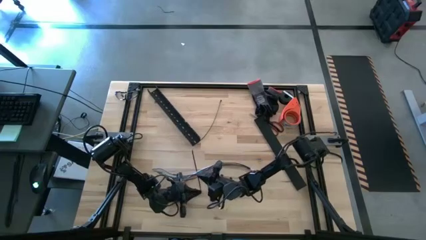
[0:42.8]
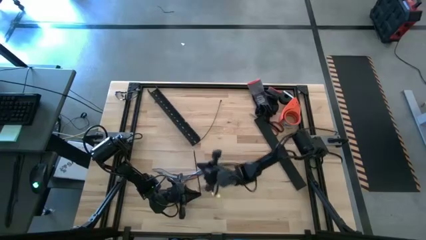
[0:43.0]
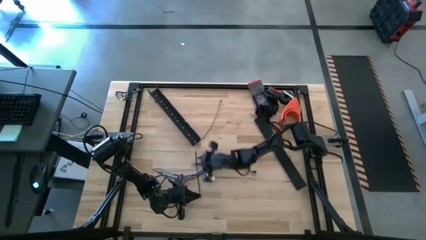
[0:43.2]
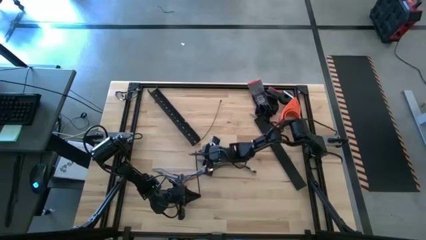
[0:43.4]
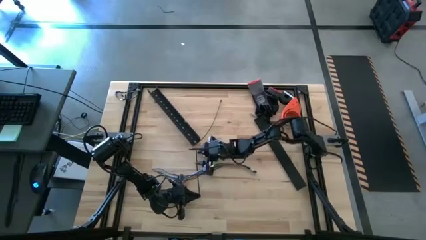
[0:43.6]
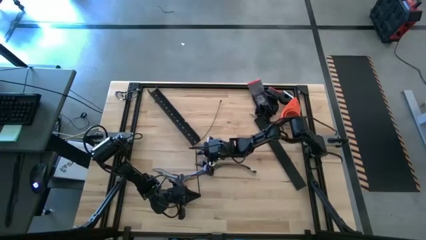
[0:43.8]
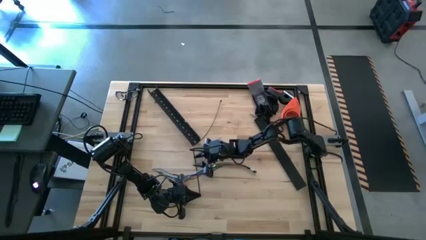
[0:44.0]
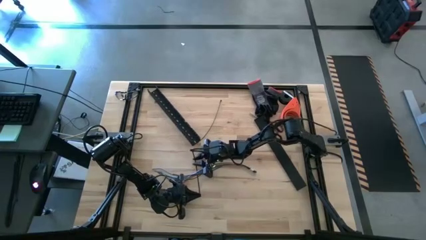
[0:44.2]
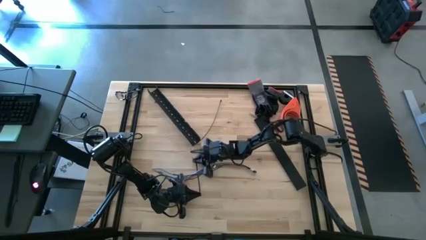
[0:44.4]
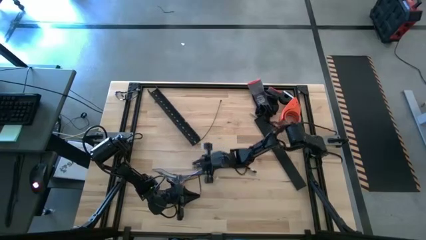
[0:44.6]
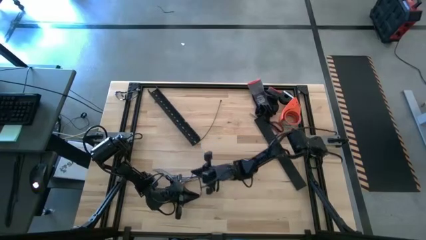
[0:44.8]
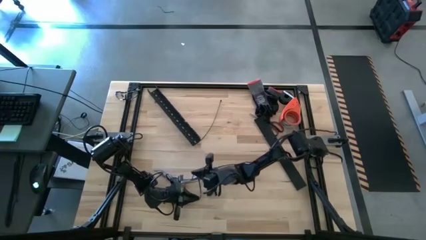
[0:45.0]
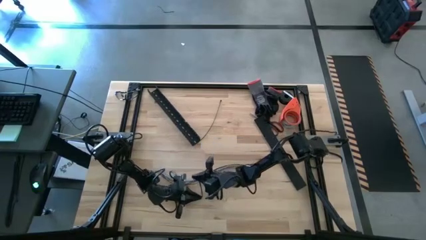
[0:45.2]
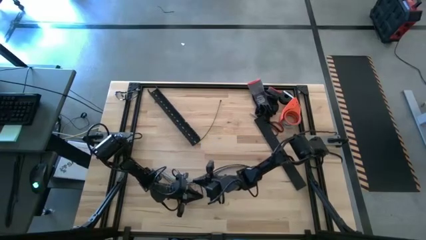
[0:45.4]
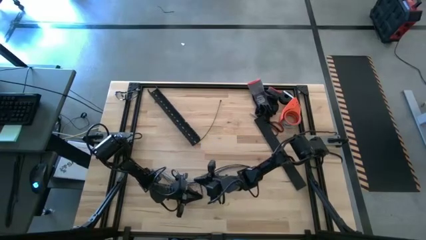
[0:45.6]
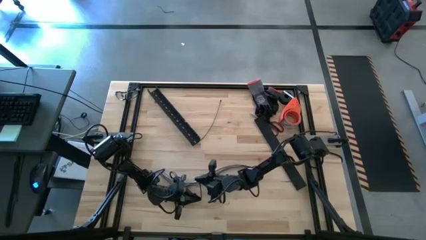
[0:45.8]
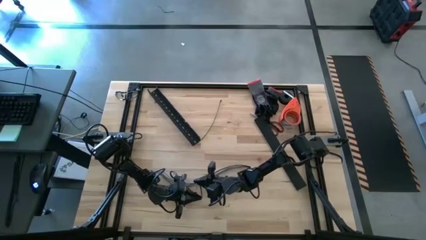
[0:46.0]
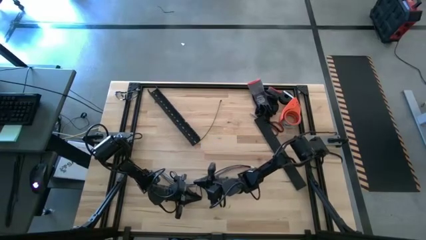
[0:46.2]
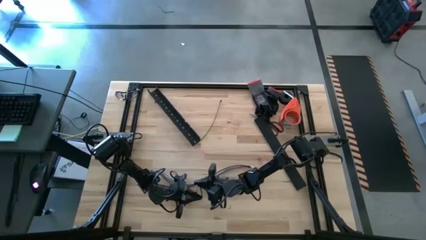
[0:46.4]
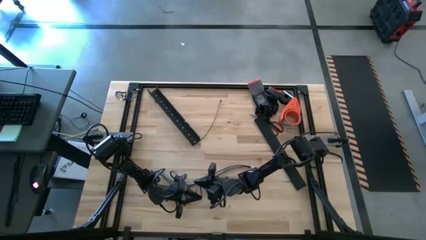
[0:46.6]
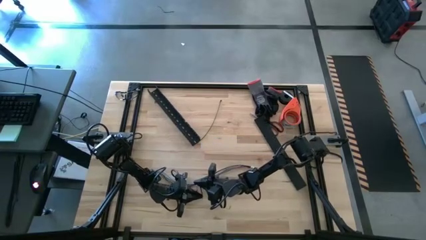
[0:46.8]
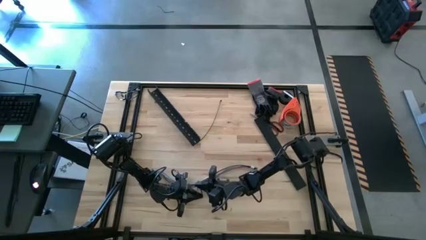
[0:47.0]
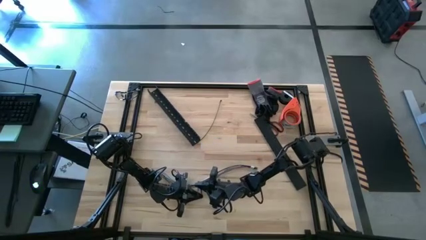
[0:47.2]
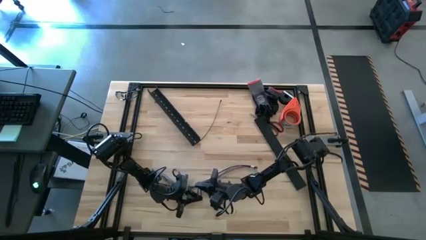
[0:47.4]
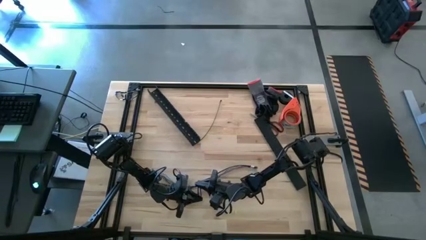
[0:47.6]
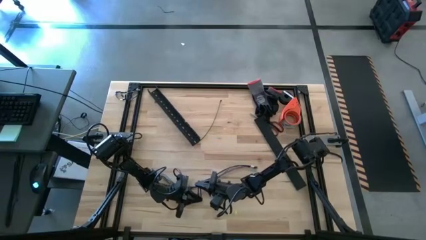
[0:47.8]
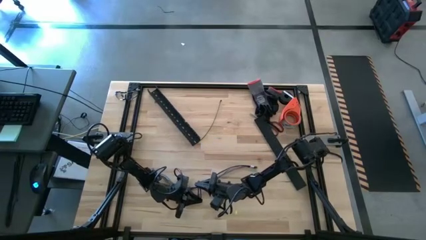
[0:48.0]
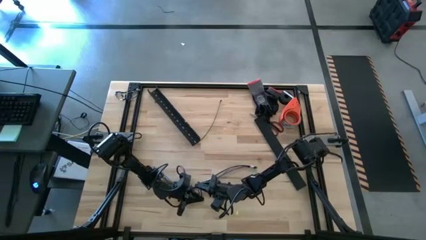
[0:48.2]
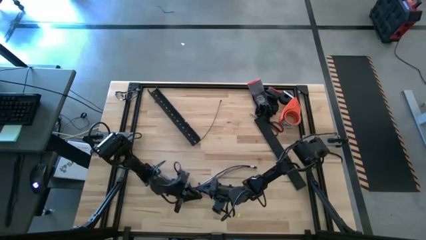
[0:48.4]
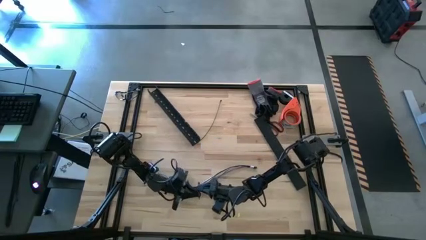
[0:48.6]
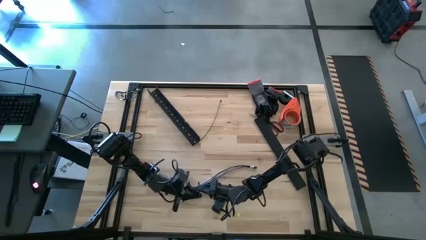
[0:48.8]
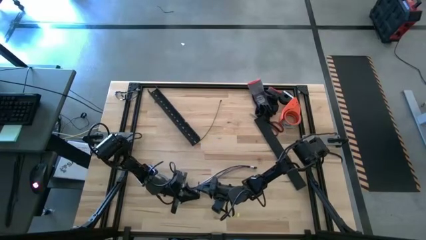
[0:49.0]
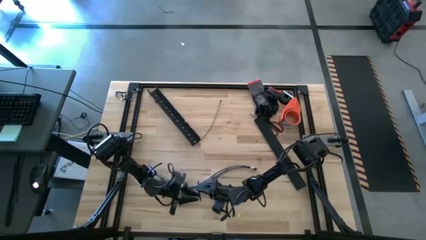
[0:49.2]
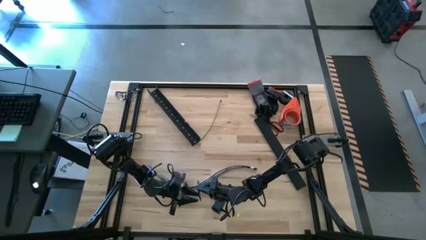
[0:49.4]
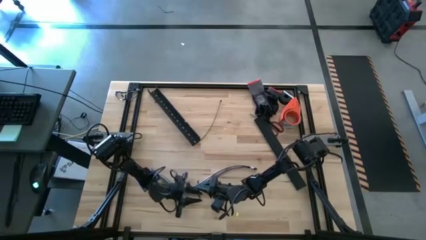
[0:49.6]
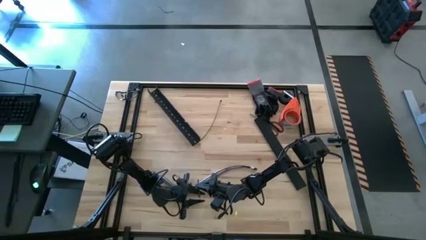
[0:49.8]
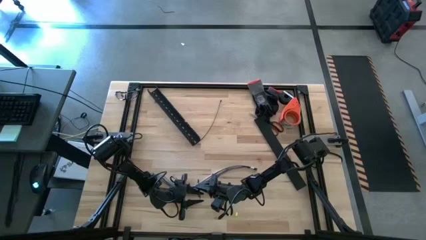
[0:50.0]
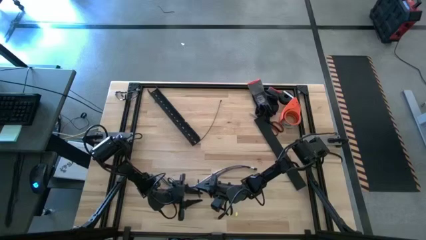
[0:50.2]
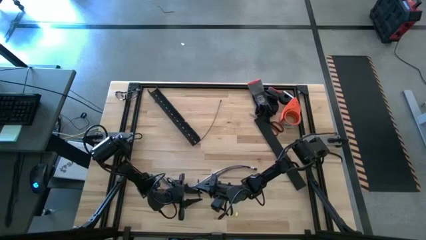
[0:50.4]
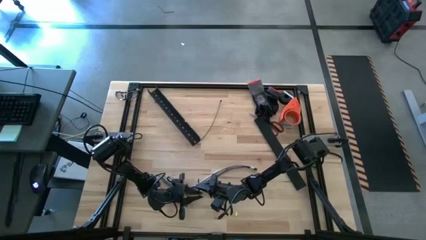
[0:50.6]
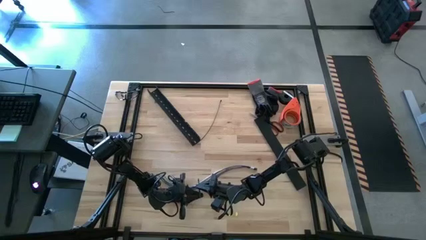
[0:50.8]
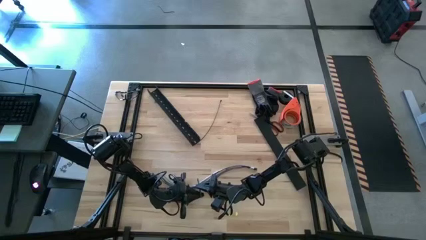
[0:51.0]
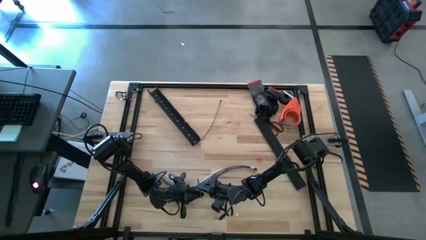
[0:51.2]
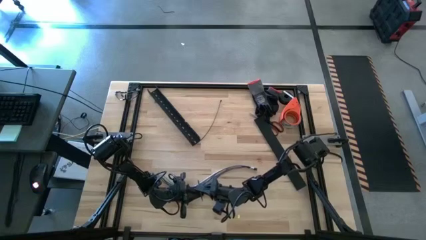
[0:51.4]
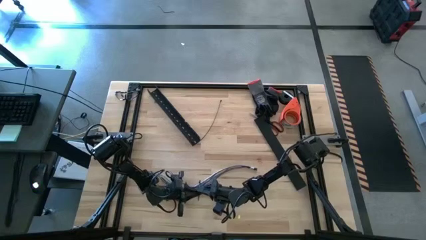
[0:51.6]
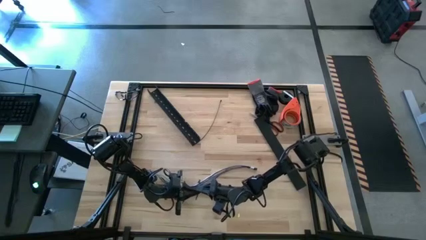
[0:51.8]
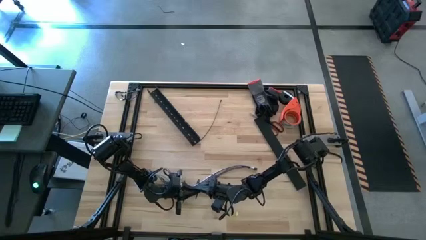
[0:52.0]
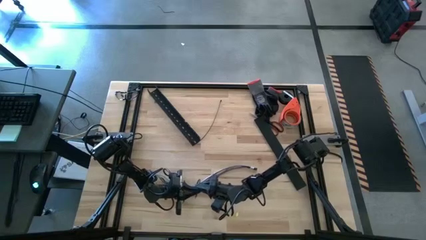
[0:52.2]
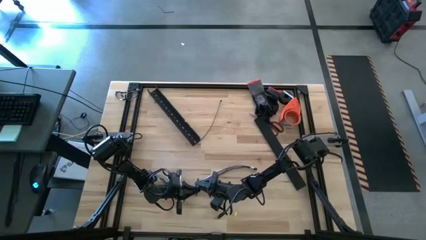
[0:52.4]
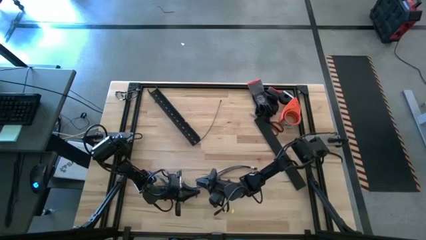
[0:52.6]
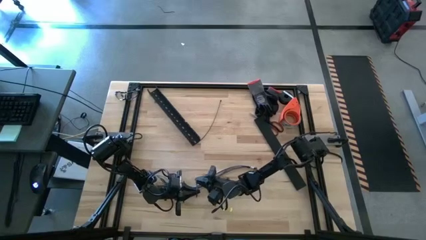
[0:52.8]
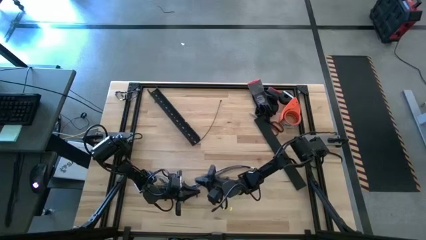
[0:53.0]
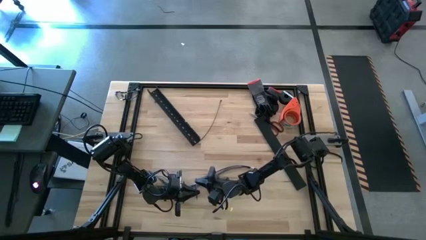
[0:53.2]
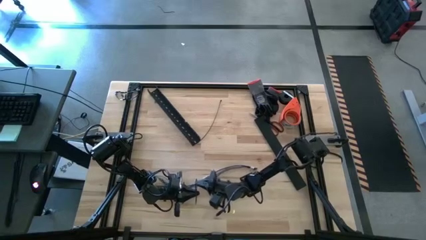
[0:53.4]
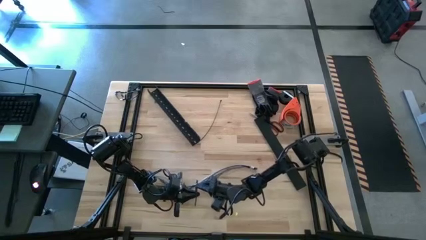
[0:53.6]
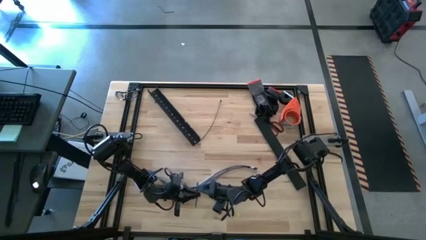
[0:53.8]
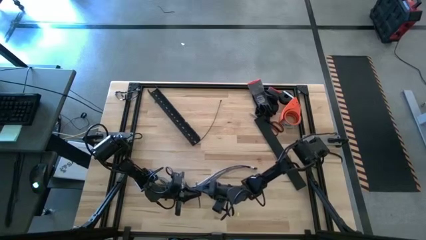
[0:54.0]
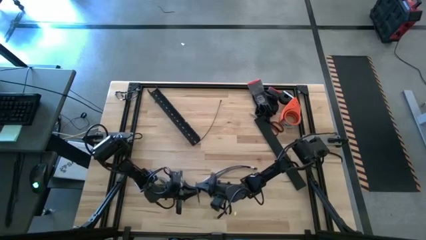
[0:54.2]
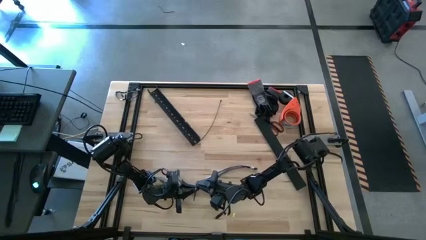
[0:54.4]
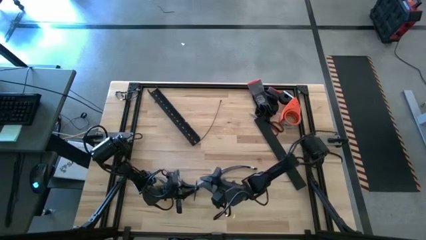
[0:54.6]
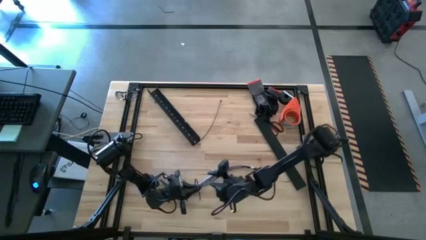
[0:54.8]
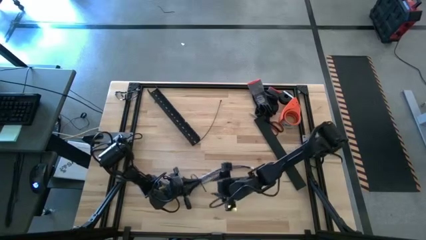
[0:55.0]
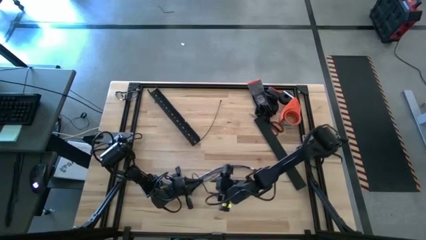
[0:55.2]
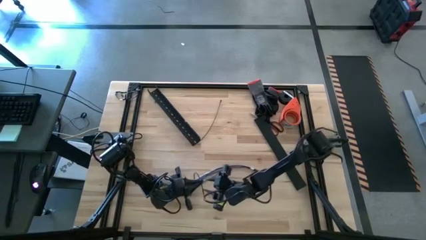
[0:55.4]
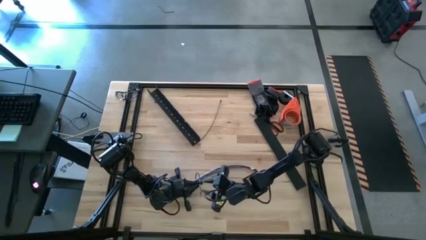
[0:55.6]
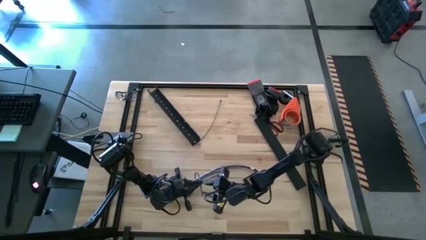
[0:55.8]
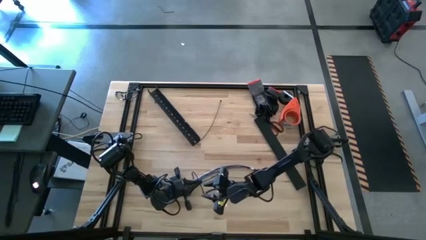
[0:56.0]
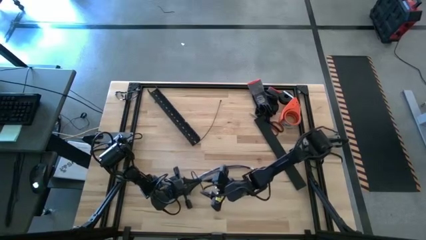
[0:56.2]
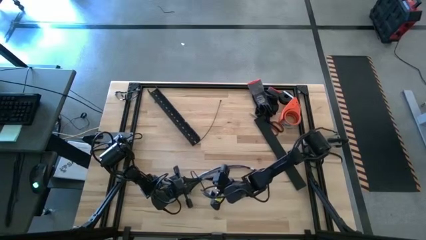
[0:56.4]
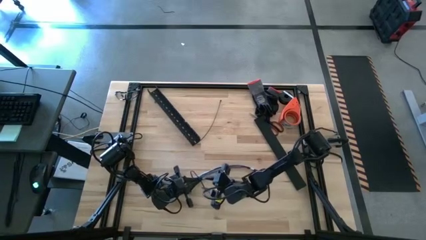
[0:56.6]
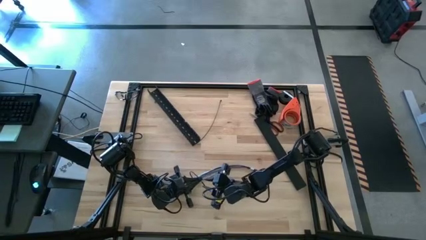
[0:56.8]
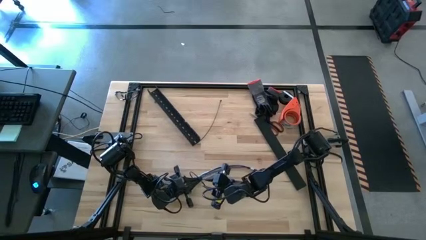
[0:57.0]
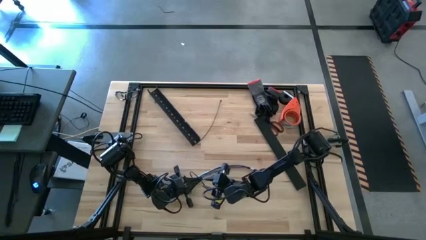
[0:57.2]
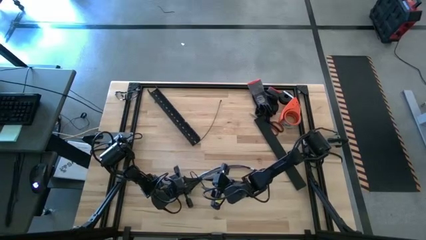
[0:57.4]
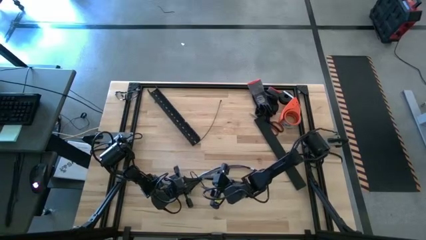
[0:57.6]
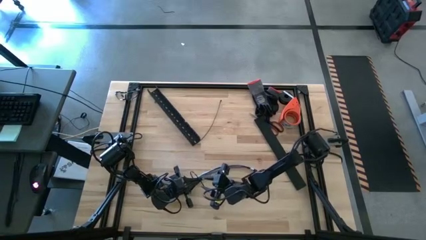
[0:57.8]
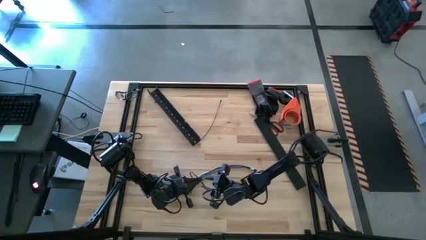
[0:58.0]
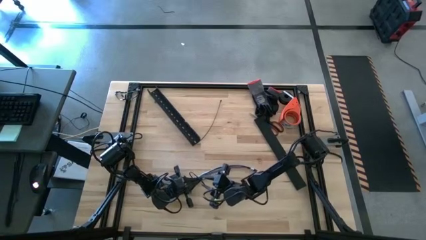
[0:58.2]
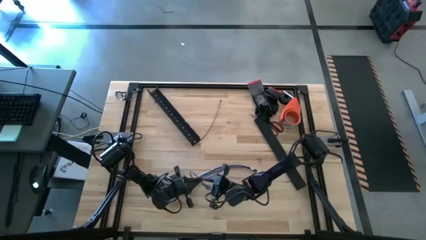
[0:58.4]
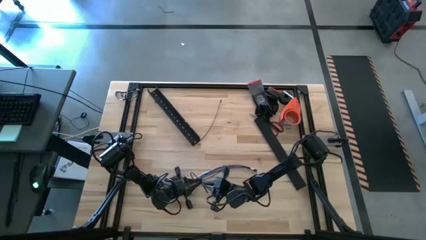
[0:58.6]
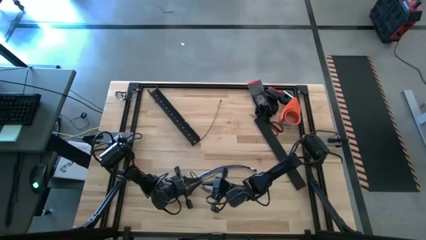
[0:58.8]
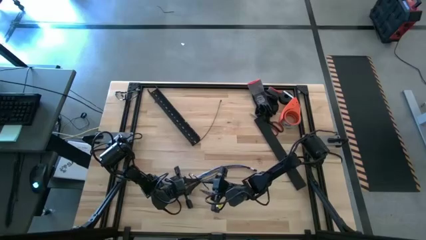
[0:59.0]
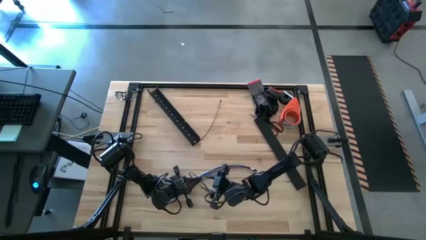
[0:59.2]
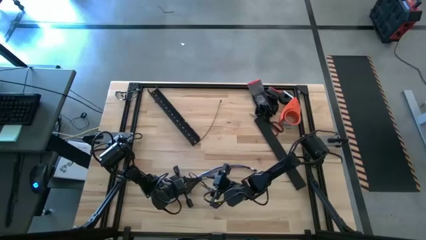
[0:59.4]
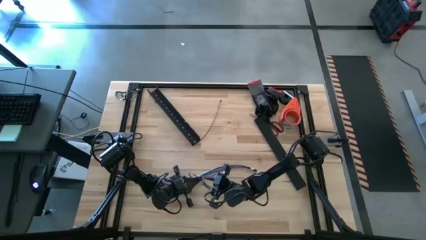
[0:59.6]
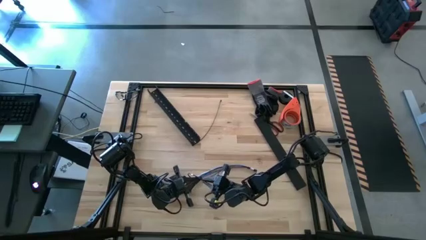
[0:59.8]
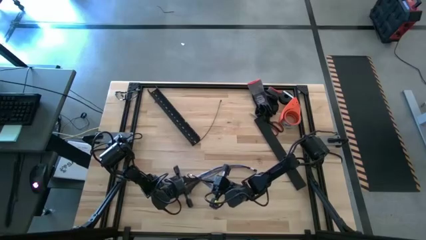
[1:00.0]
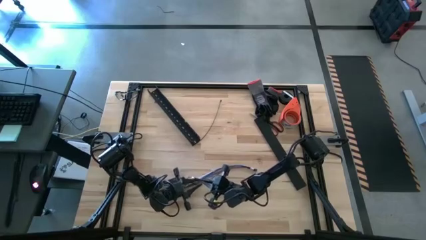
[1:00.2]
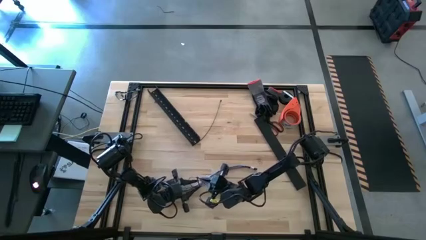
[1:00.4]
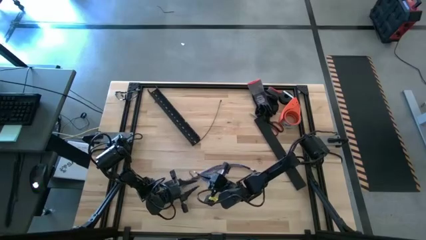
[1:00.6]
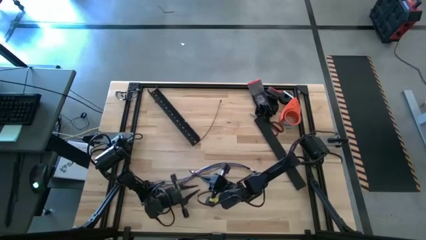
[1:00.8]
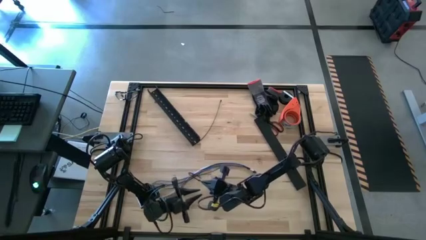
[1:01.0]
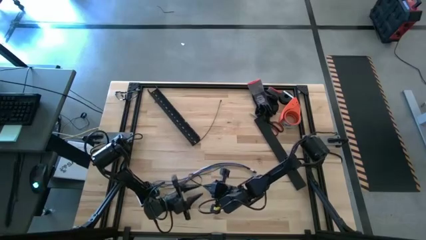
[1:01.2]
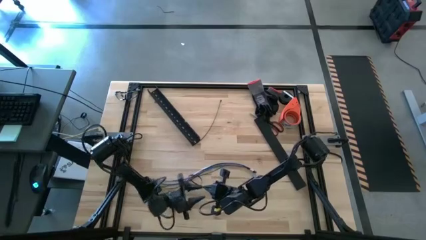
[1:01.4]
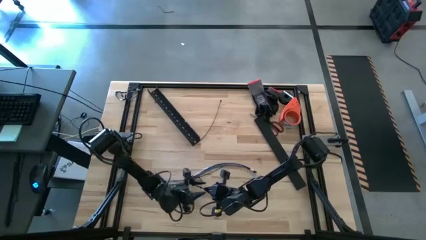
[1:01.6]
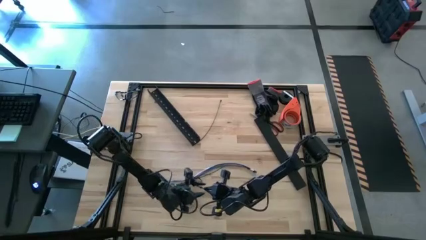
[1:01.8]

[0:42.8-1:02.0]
Task: Ziptie cables
Wrap the cable wires with the black zip tie
